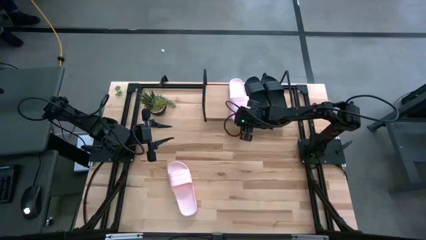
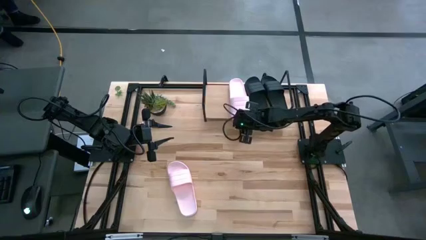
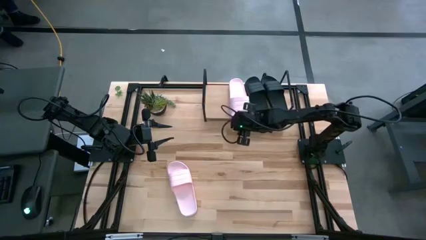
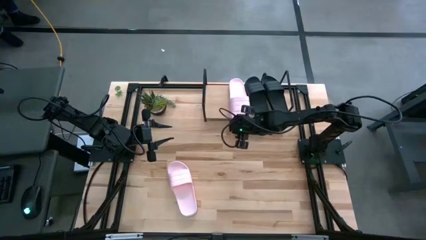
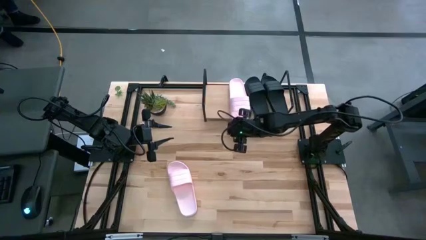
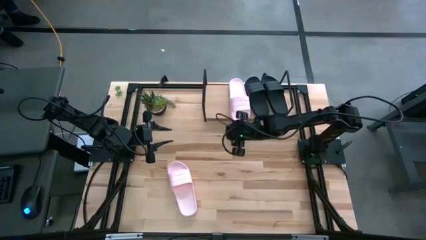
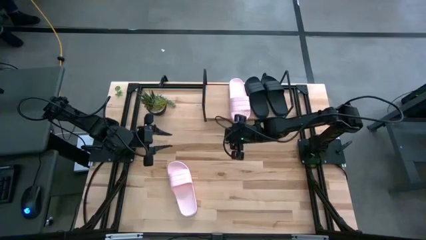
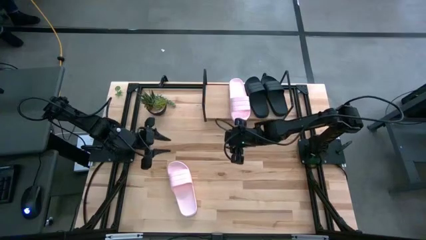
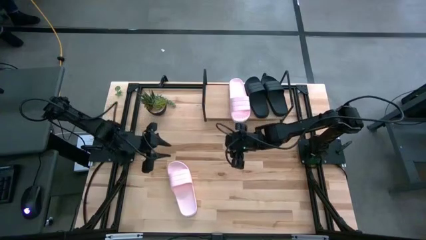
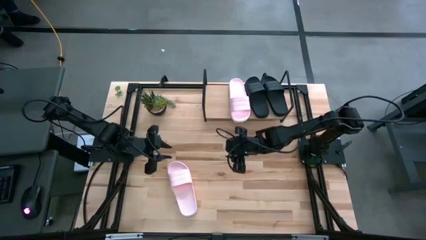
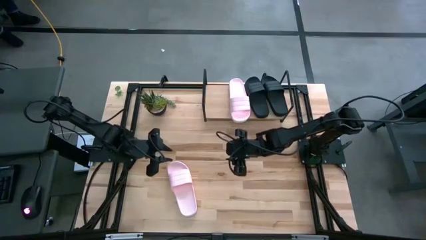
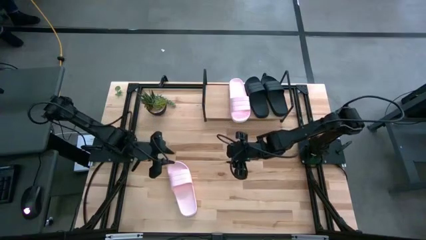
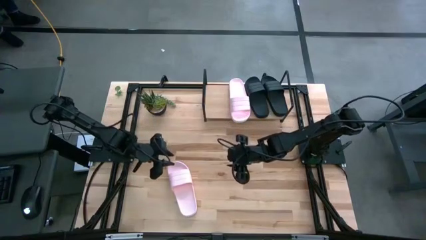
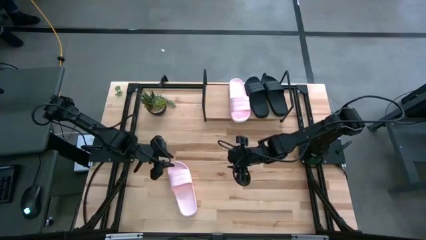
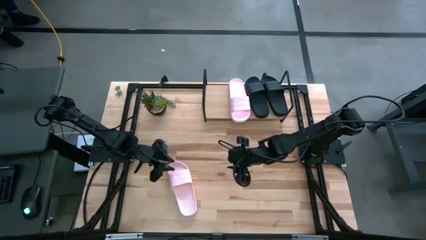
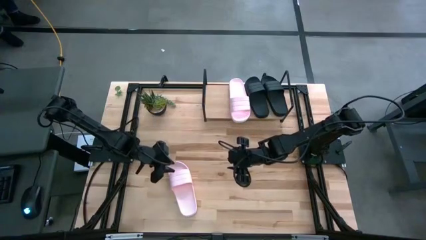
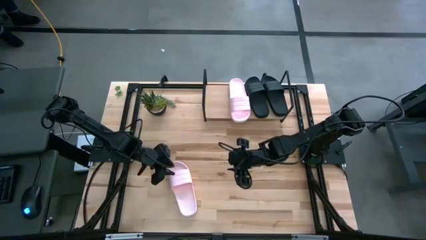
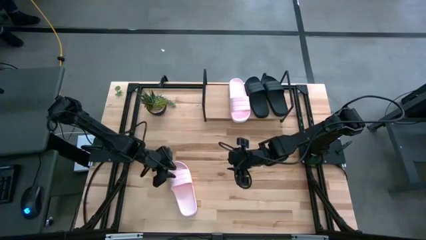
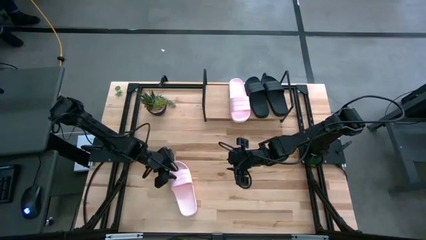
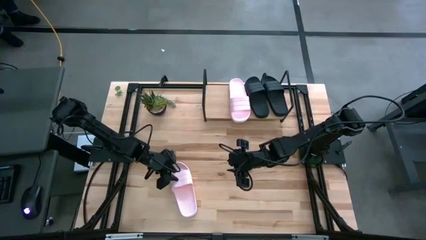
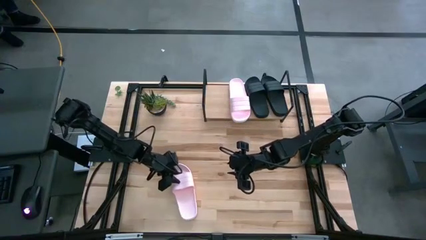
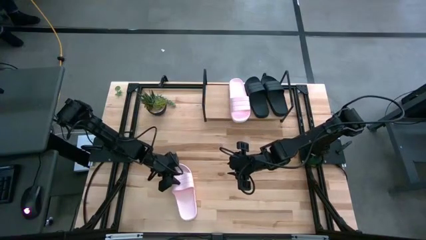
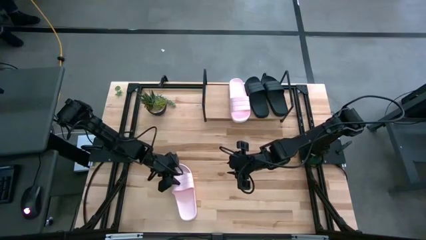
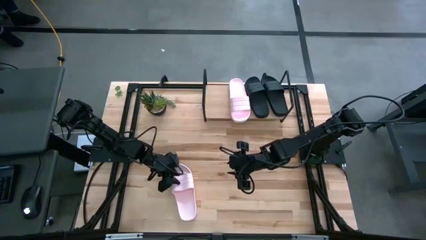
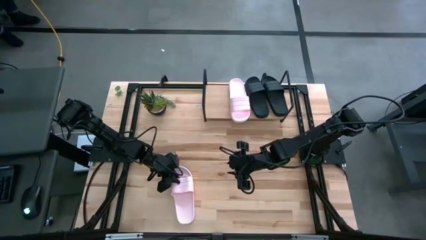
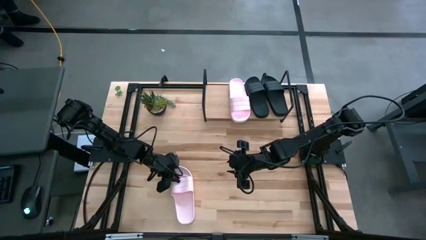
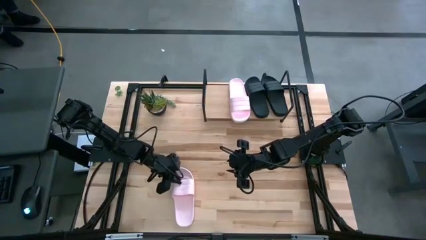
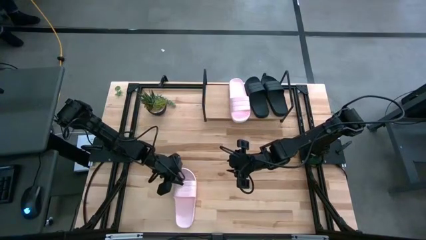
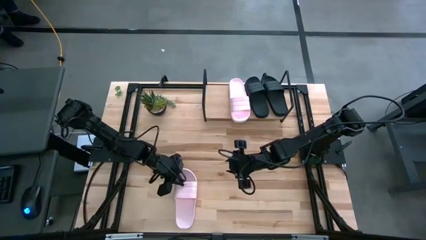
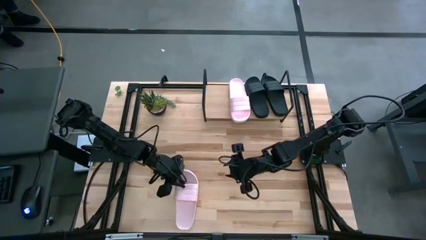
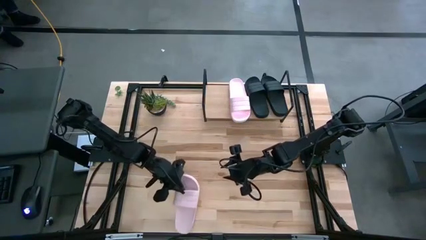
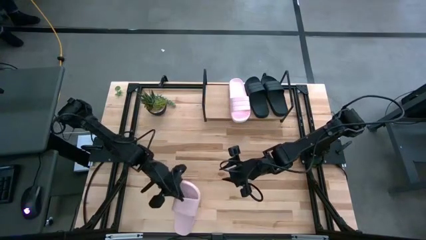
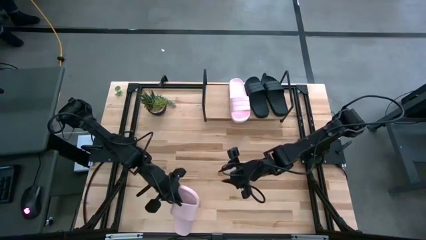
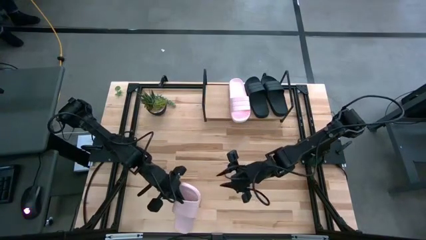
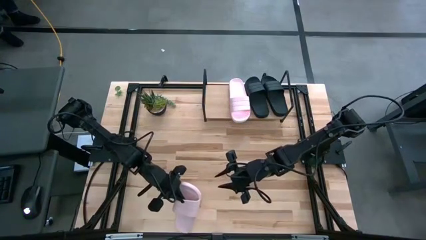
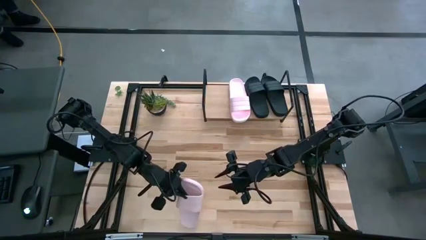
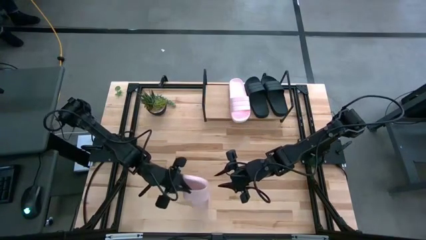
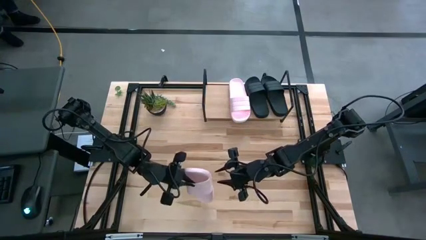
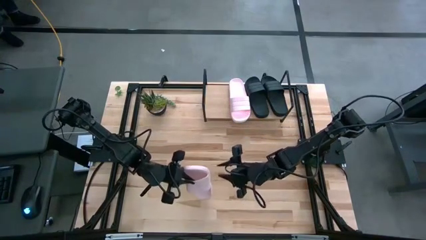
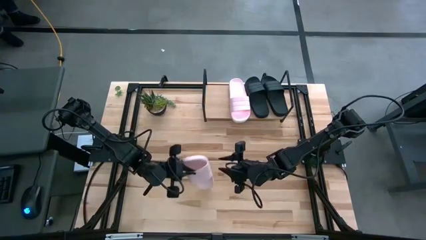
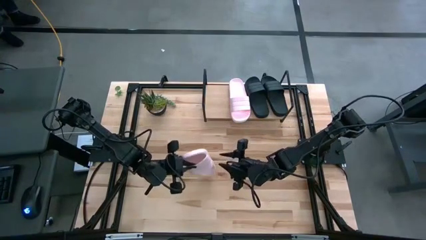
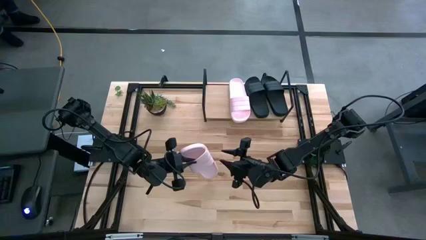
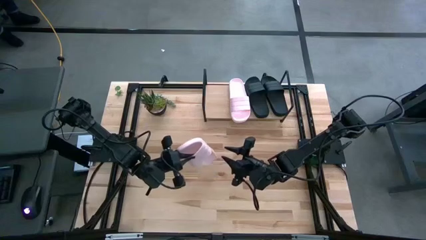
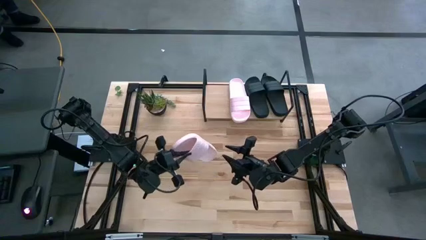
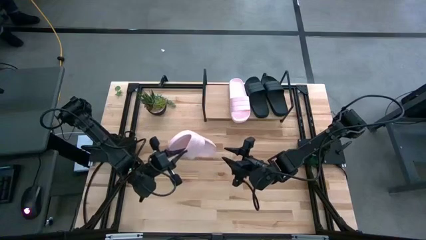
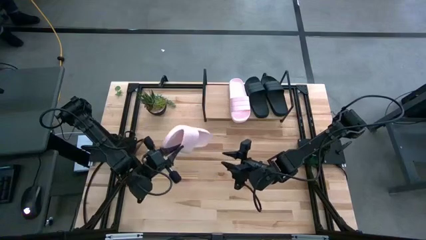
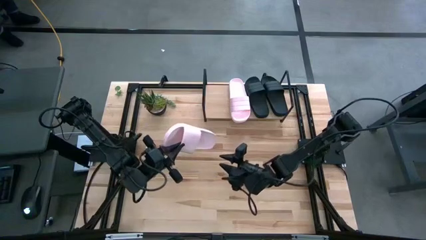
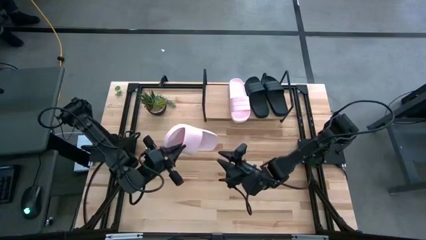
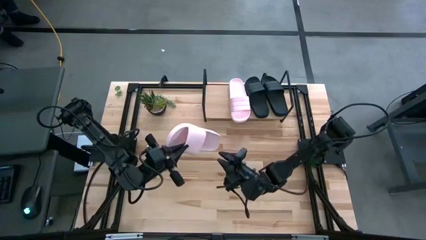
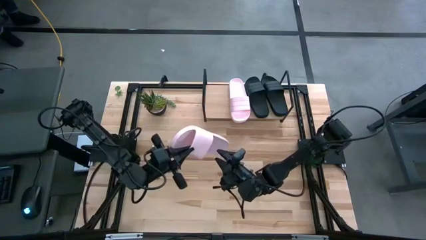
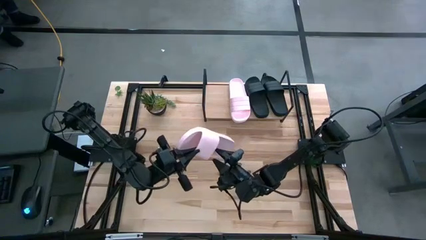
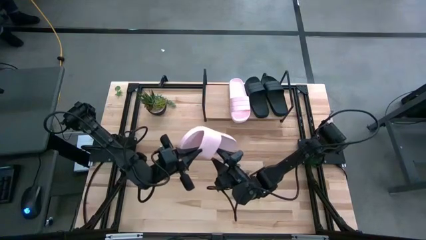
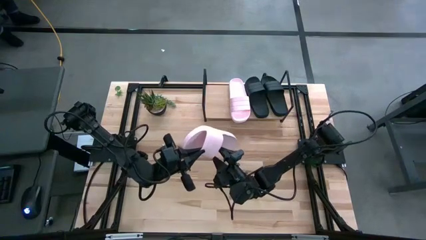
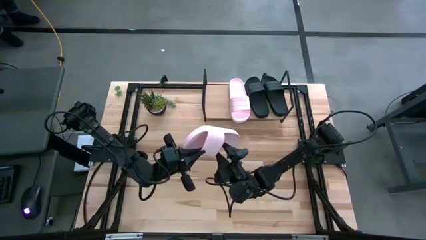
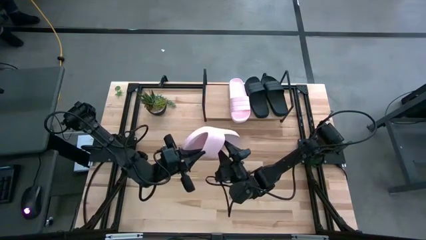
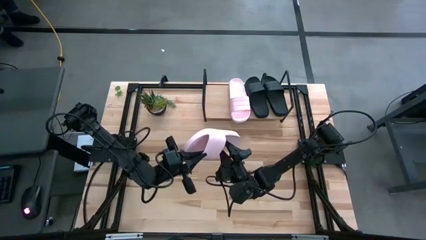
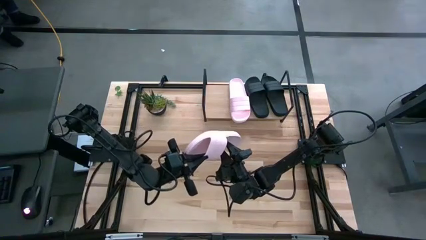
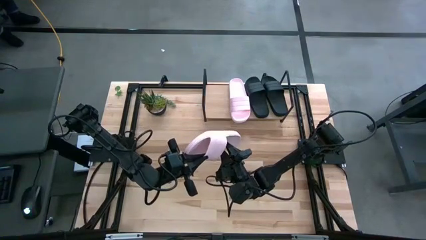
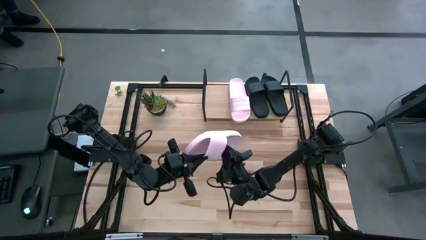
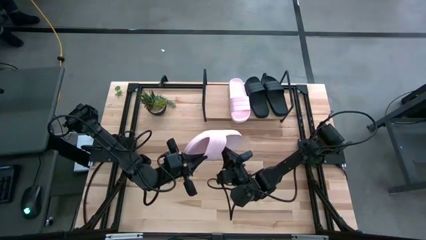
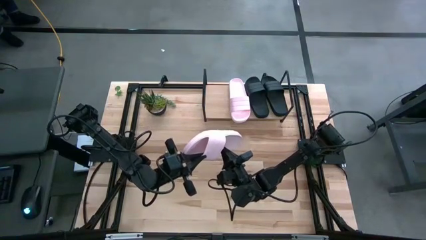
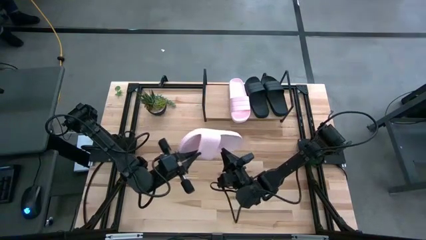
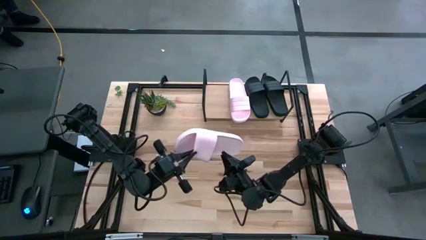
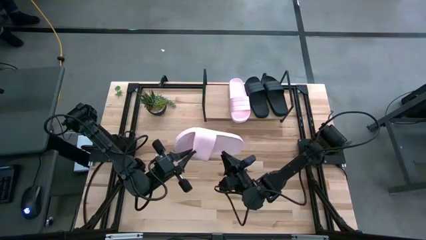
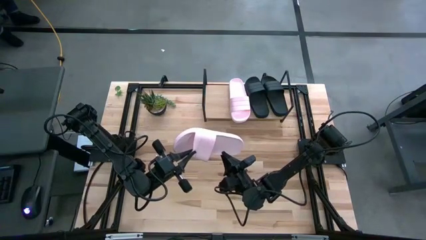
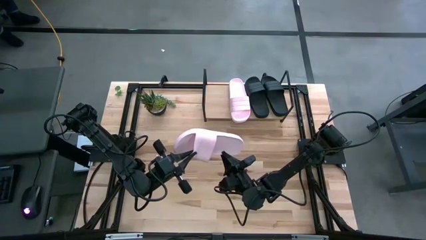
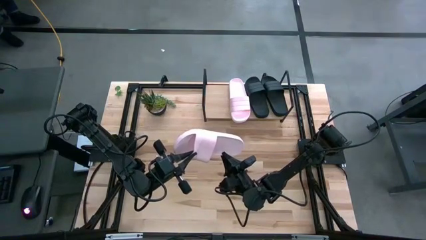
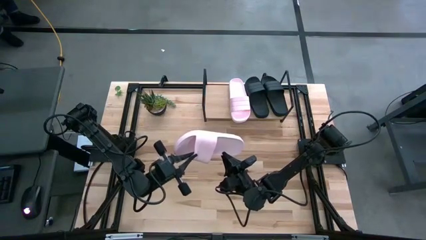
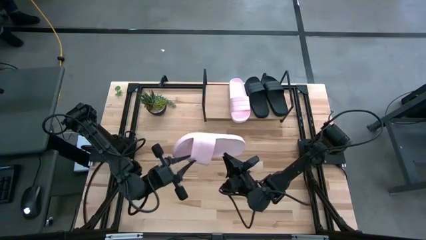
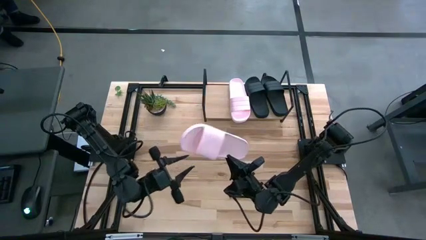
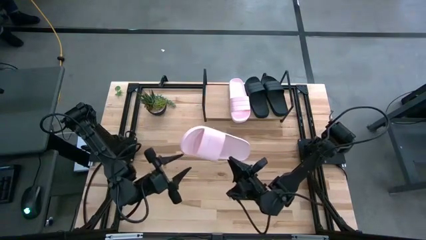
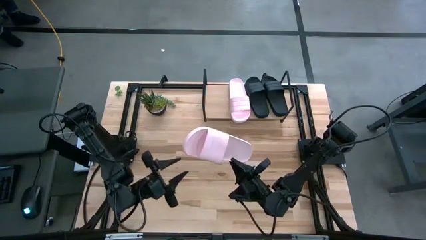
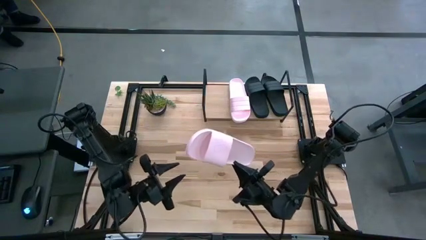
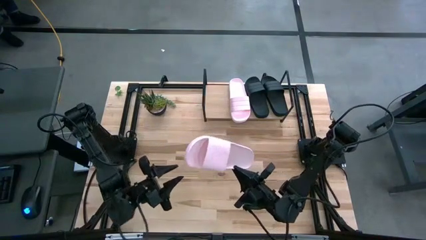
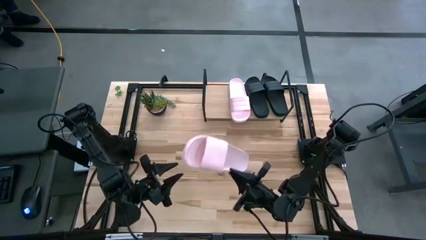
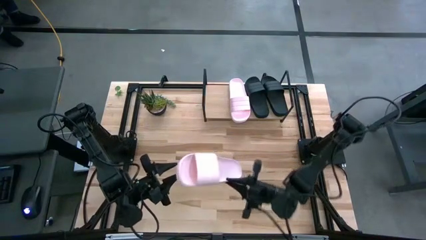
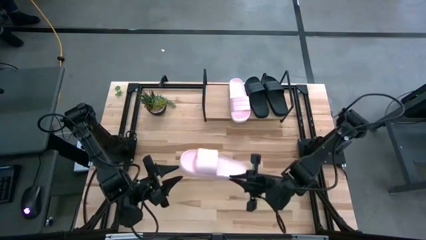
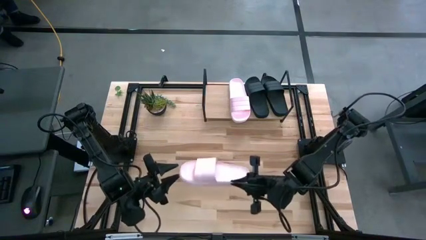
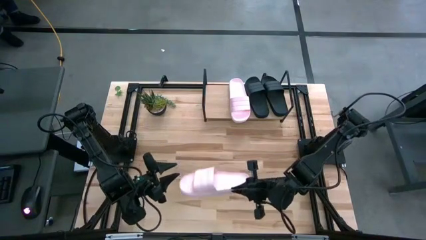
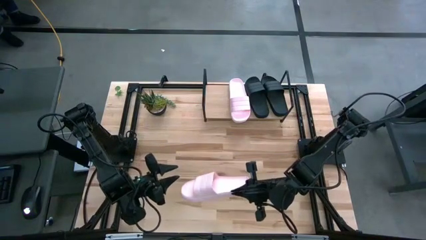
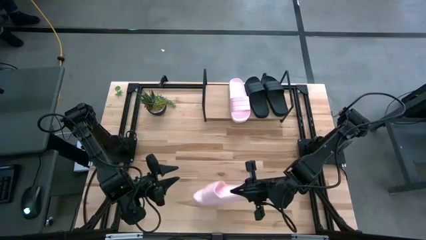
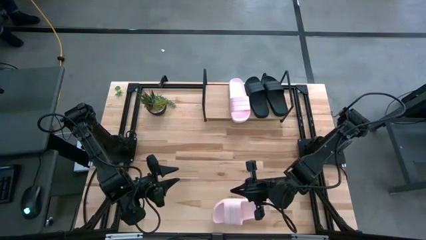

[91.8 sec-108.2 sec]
Task: Pick and place slides into the shelf
Put the pink slide on the shelf
